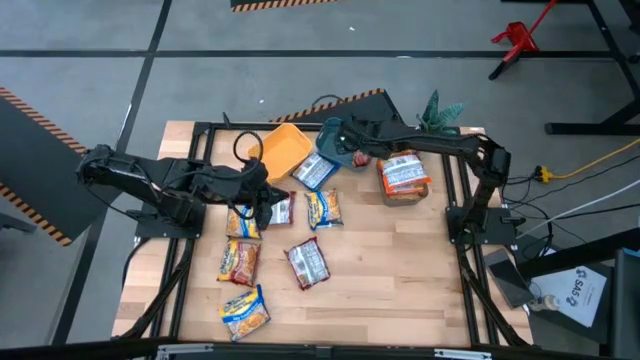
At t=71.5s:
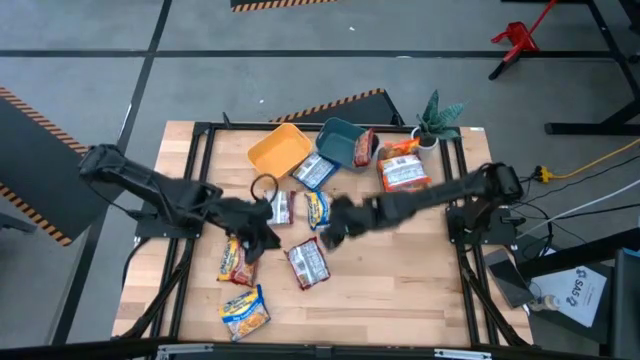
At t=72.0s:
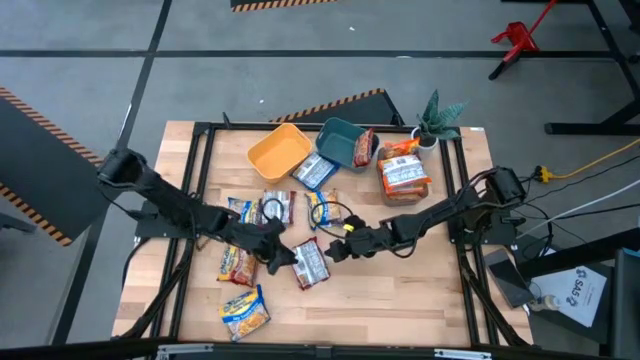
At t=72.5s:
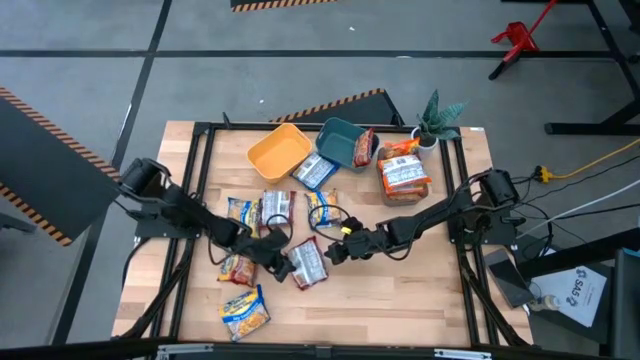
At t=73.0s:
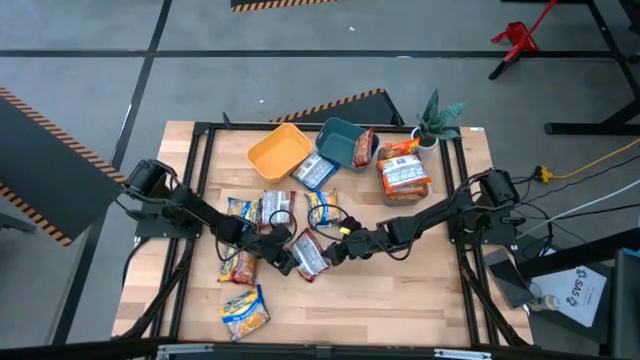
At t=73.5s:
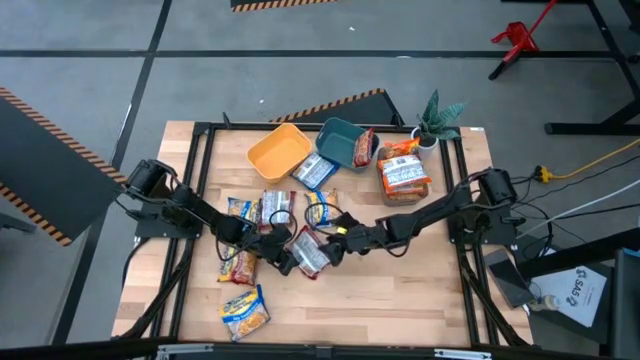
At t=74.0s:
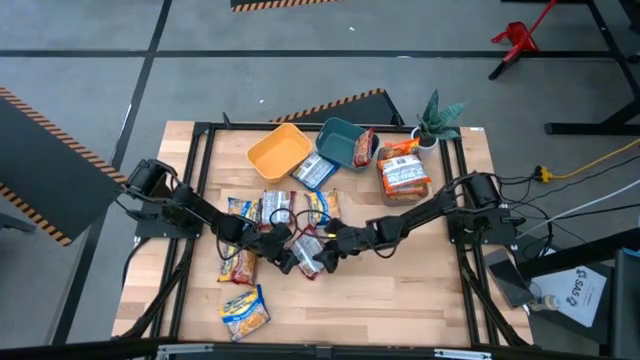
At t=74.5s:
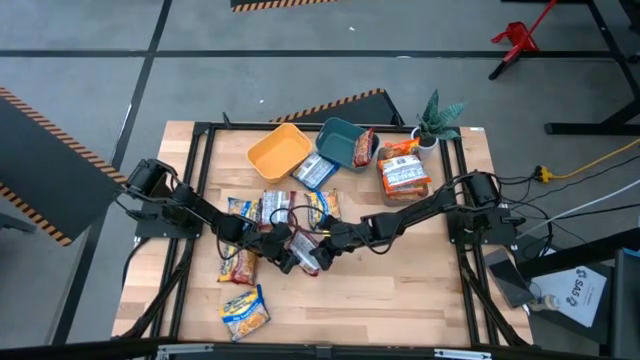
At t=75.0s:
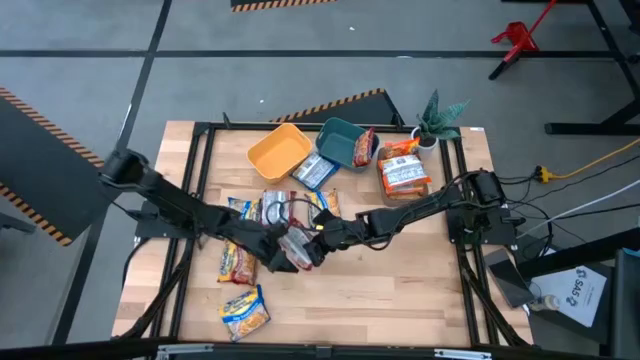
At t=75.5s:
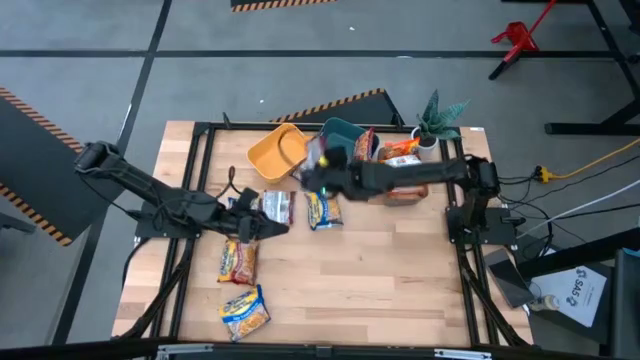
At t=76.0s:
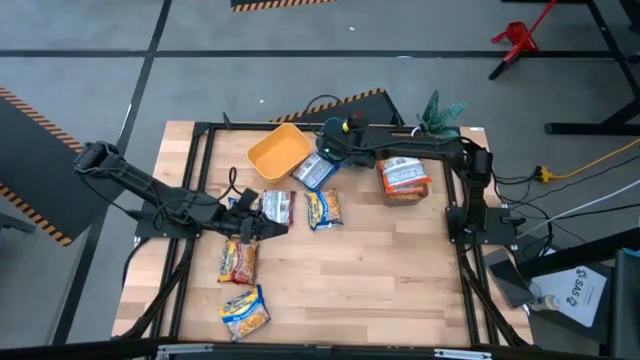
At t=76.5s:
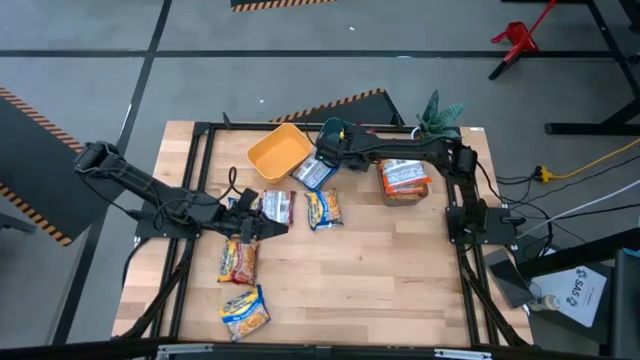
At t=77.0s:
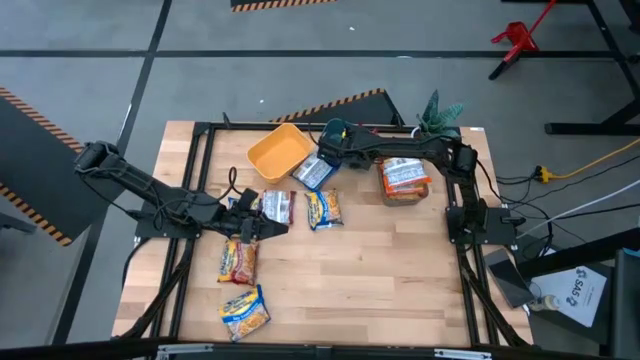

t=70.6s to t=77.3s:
Task: Sort Maruchan noodles
Put the bottom right red noodle pack into the blue bin

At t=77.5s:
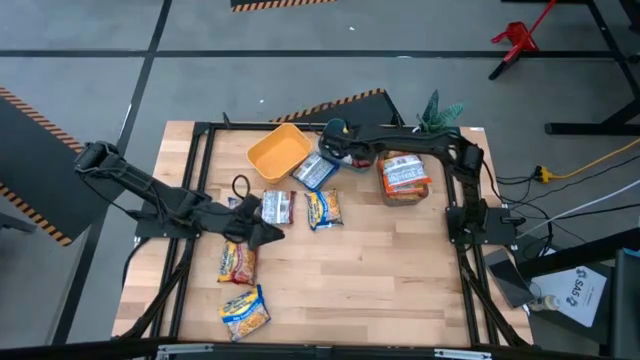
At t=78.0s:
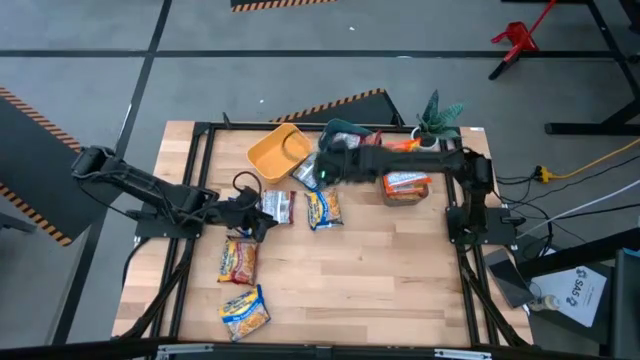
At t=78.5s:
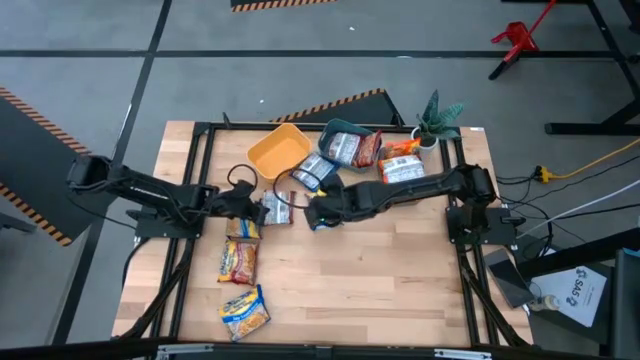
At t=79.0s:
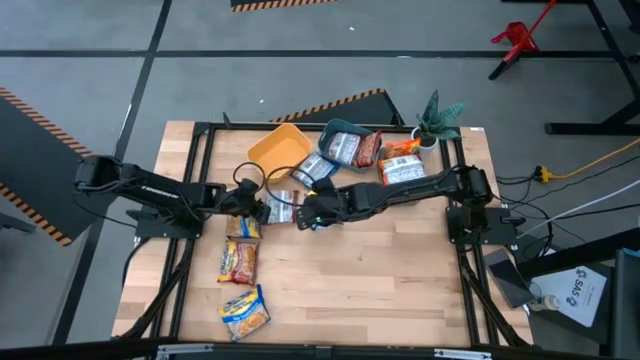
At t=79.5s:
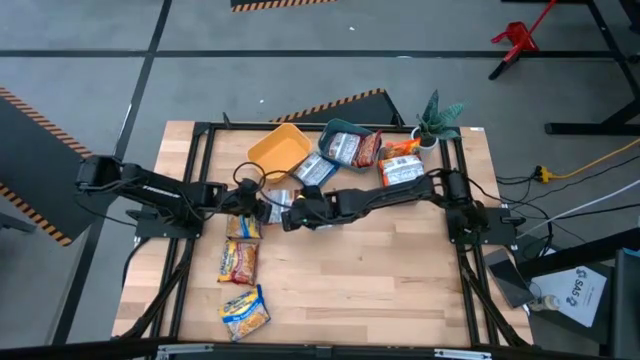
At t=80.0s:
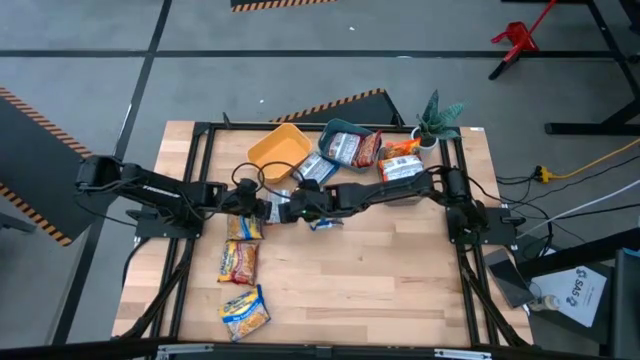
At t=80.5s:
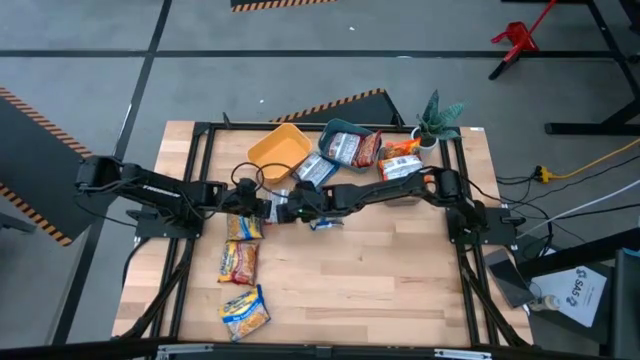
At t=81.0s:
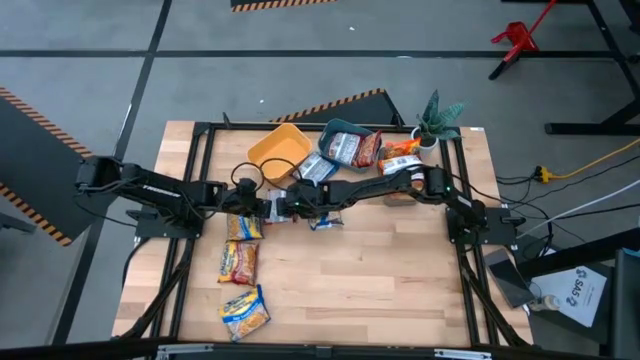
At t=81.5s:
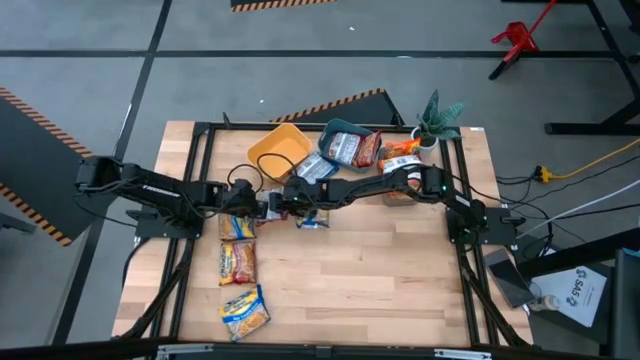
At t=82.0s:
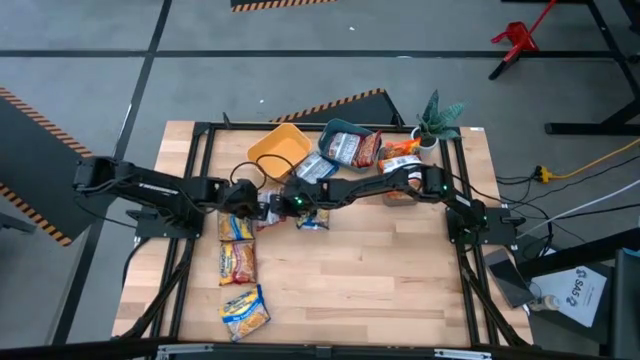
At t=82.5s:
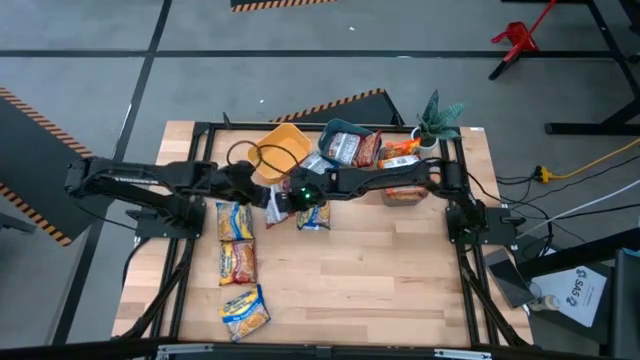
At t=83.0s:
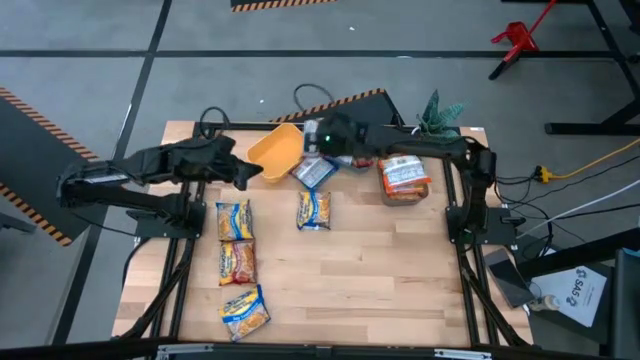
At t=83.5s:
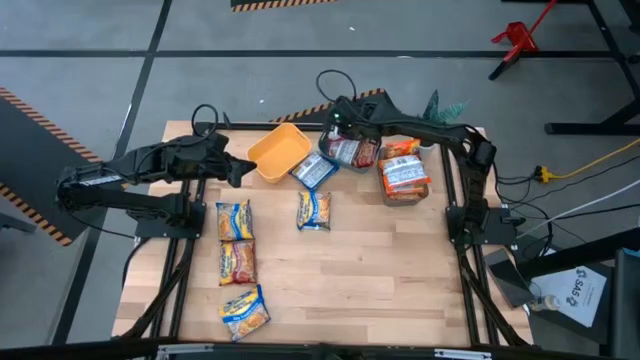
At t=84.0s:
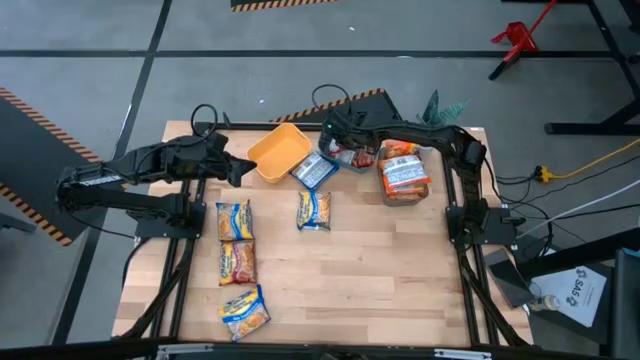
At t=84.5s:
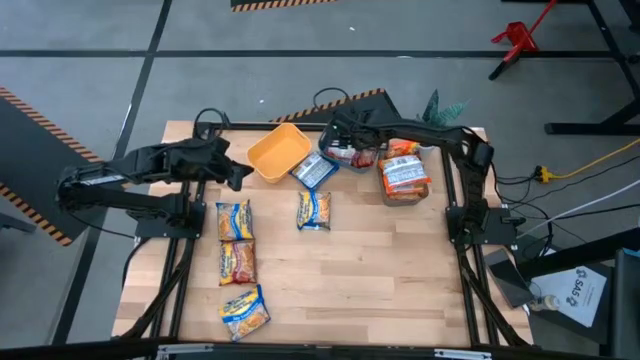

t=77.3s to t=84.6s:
Put the top red noodle pack into the blue bin

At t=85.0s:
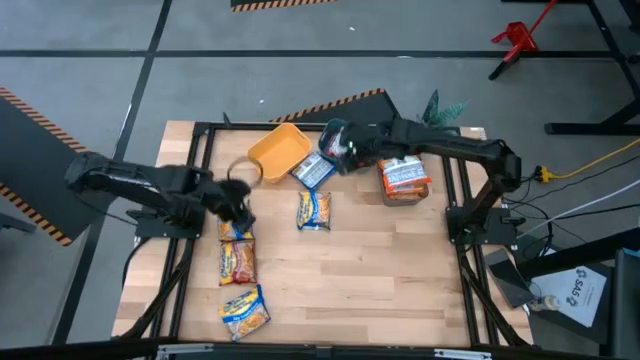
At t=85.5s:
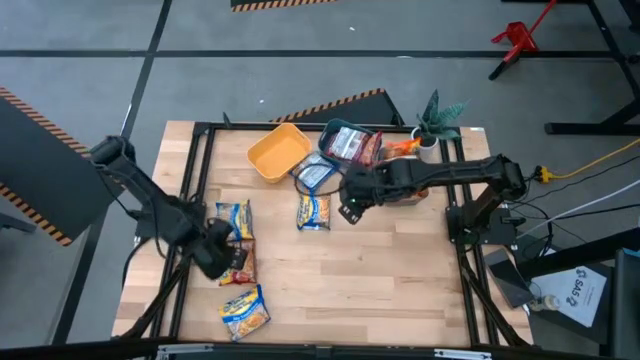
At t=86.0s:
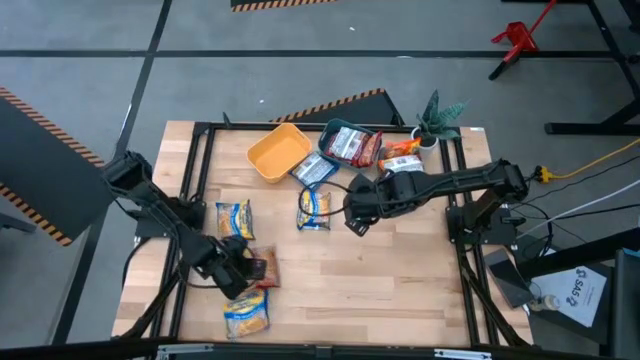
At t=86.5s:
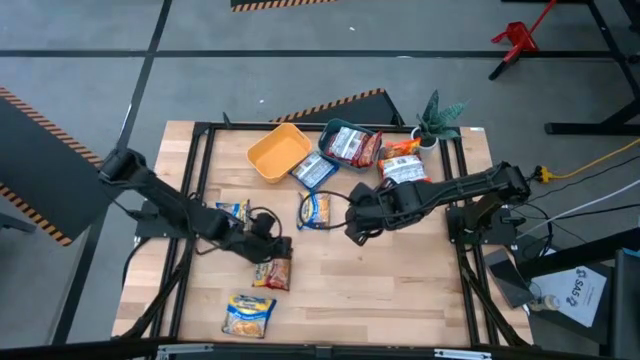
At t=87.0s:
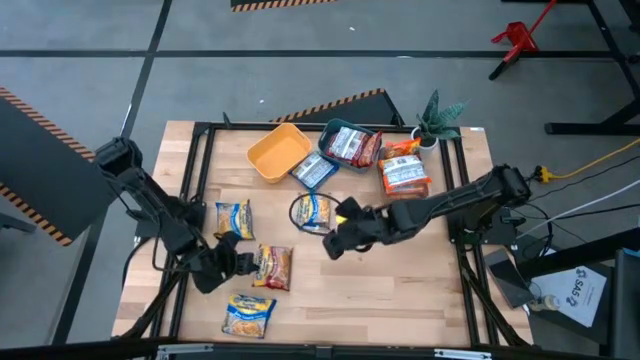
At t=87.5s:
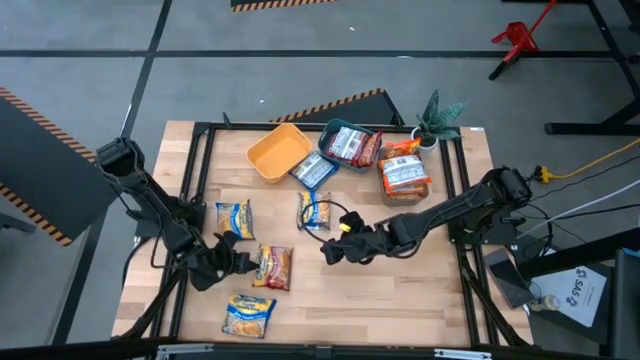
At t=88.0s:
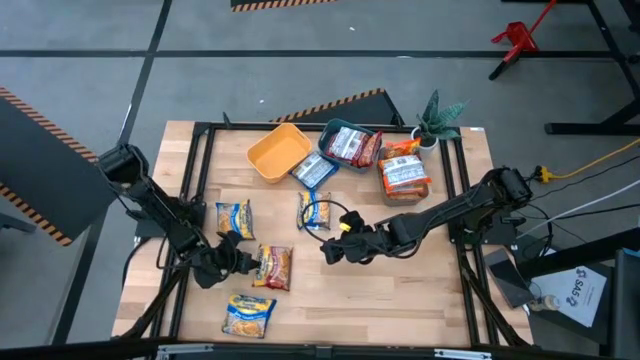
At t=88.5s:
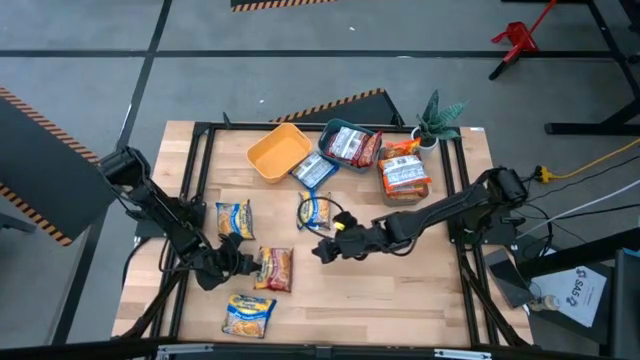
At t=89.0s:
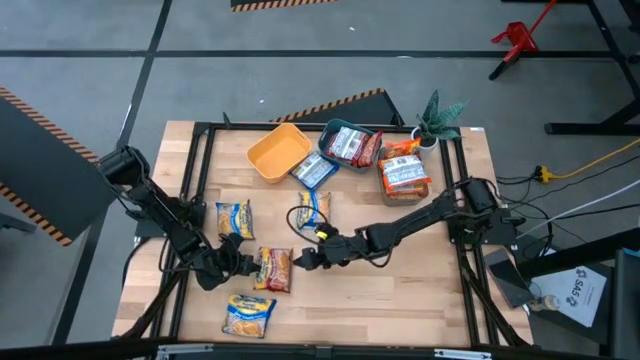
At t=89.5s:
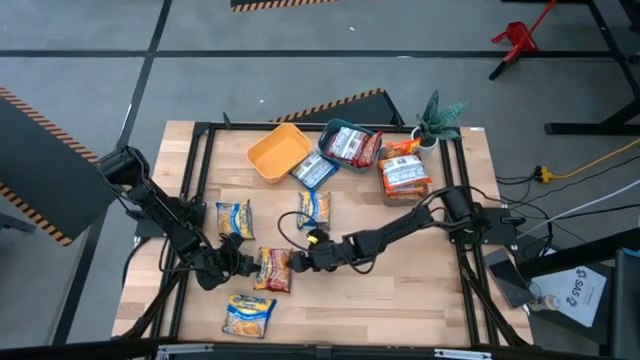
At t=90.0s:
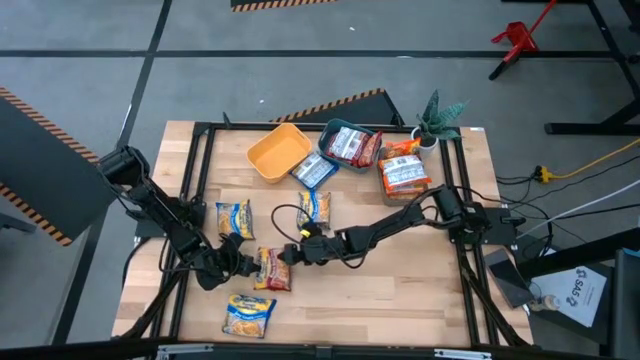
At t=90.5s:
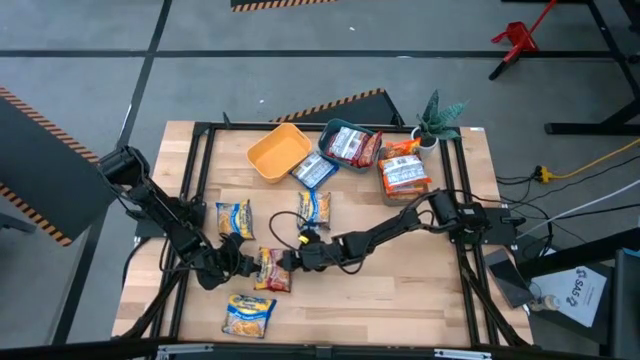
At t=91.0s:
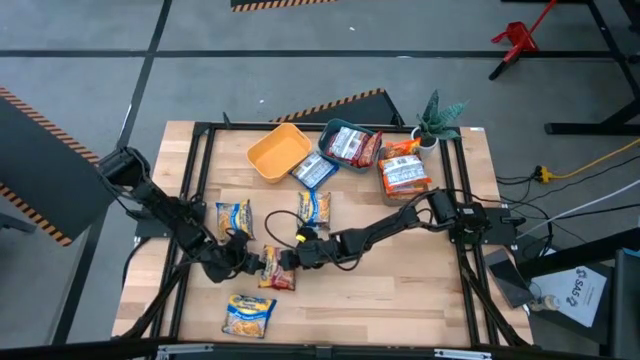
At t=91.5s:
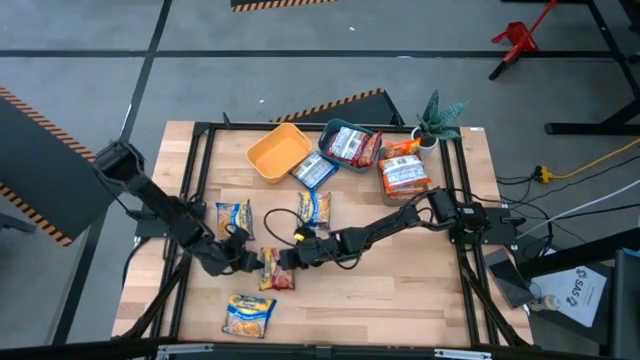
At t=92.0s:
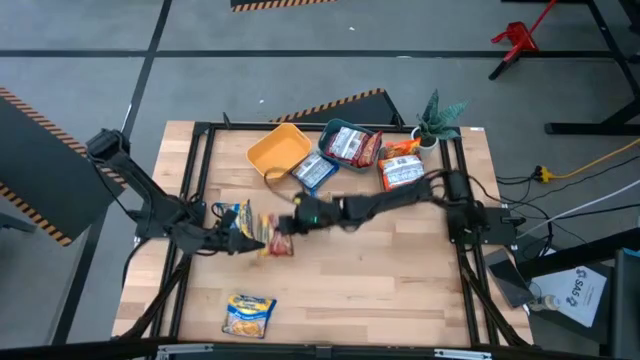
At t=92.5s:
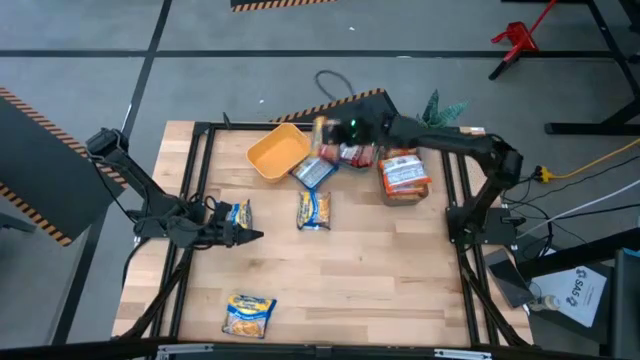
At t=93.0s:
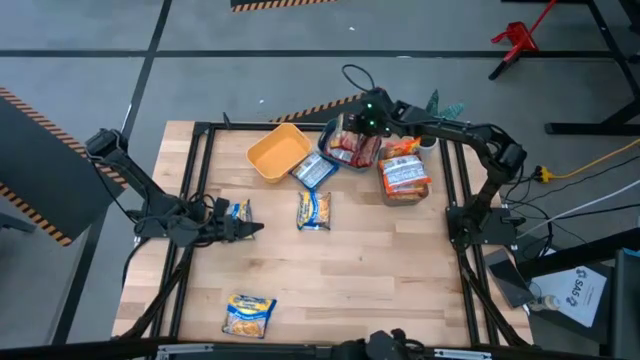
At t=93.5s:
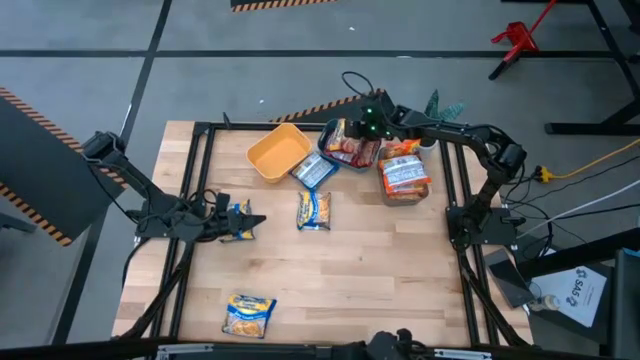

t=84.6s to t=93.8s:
Put the red noodle pack into the blue bin
